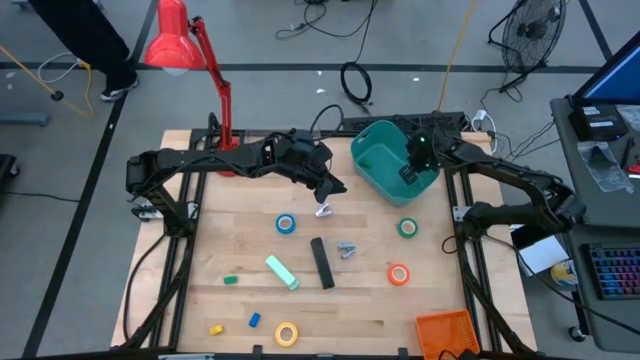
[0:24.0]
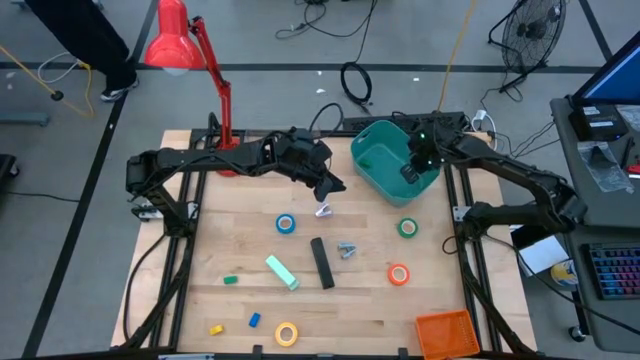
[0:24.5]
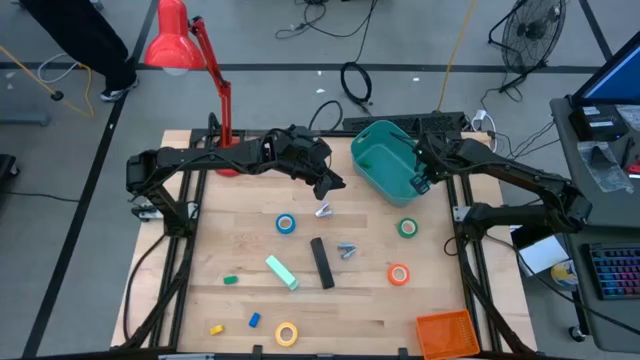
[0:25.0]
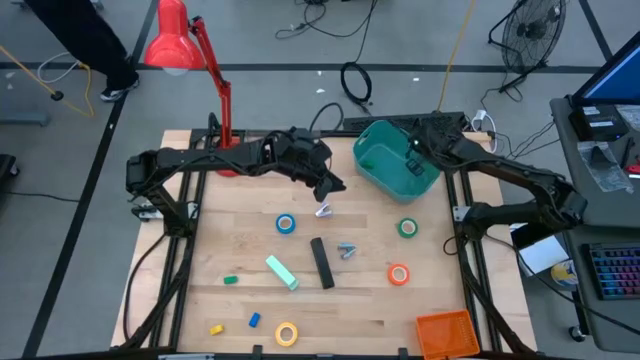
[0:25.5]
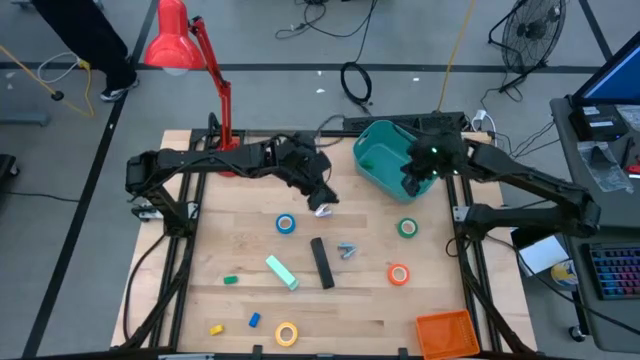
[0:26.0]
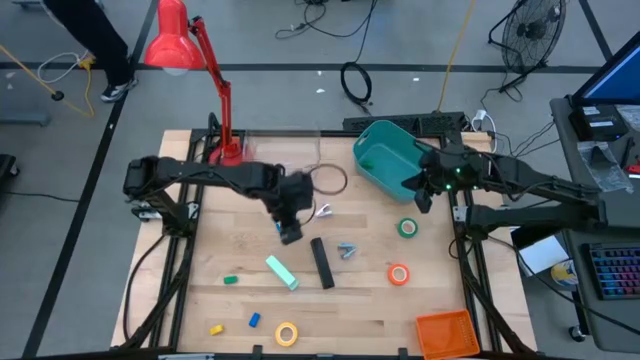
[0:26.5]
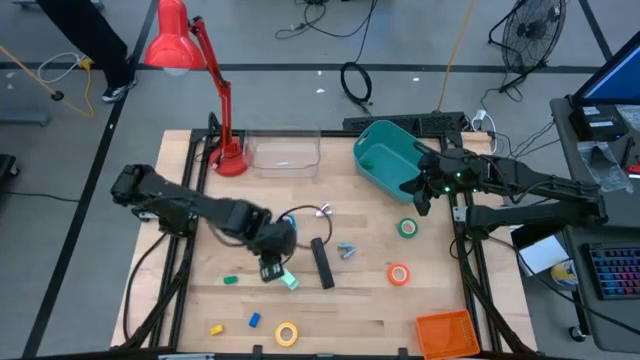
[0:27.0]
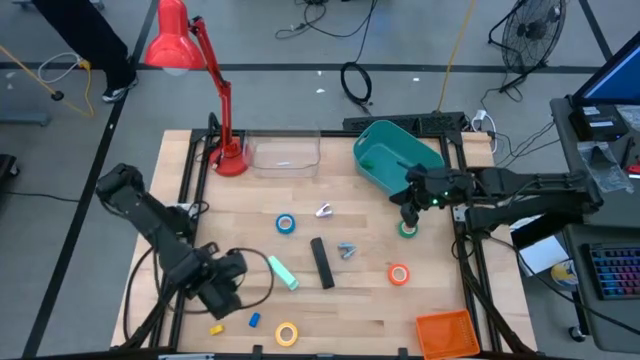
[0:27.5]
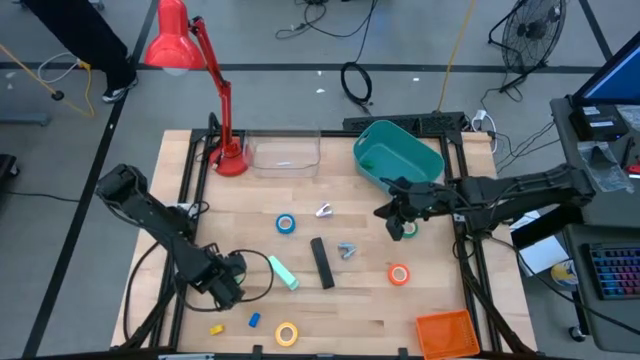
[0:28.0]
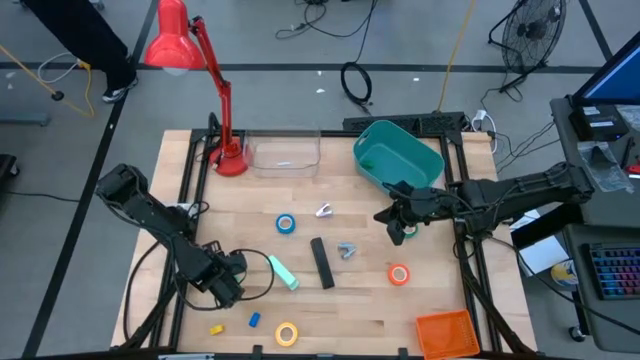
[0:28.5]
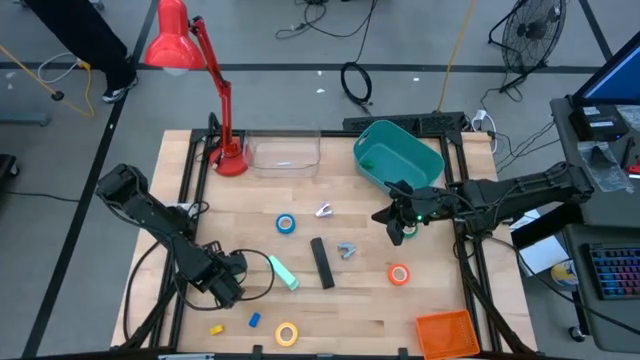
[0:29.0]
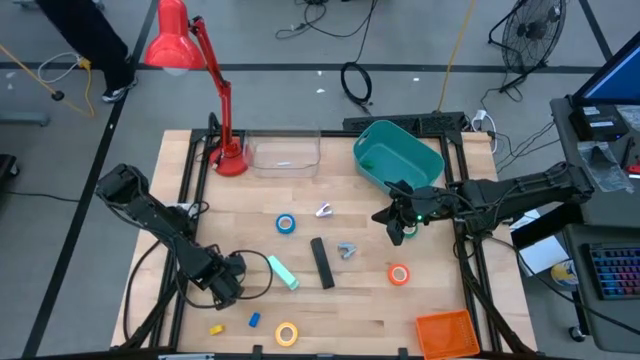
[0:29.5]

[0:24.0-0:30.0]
Task: Pick and place Stapler, Stapler remover, tape
Put the green stapler into the green bin

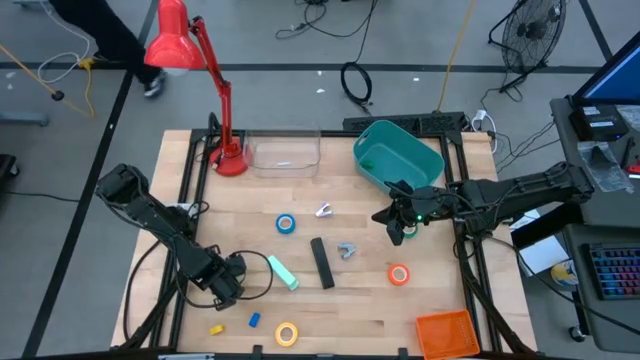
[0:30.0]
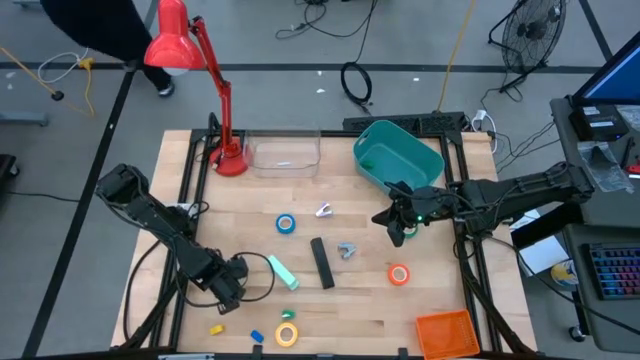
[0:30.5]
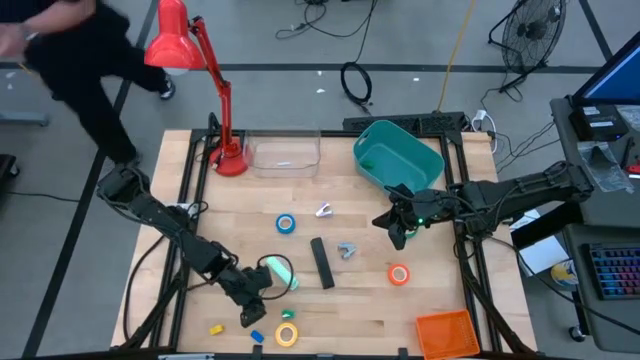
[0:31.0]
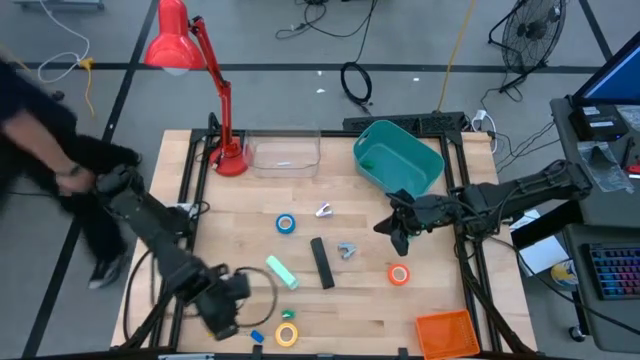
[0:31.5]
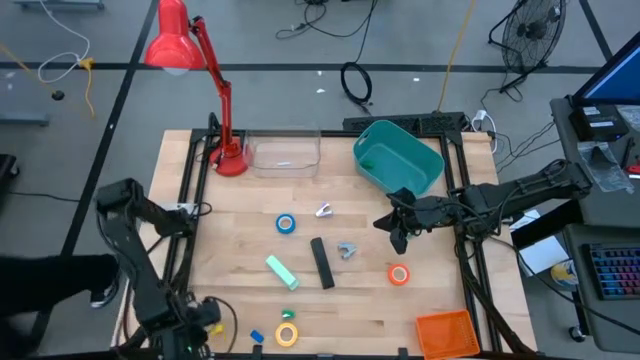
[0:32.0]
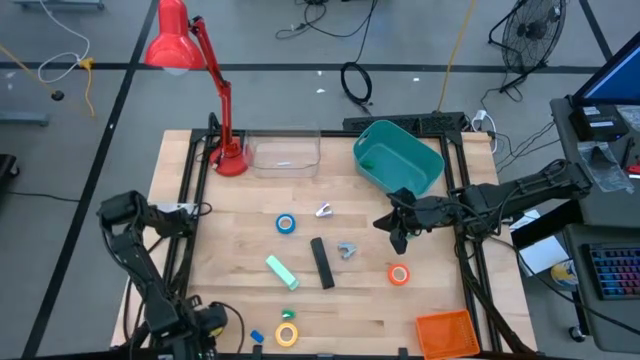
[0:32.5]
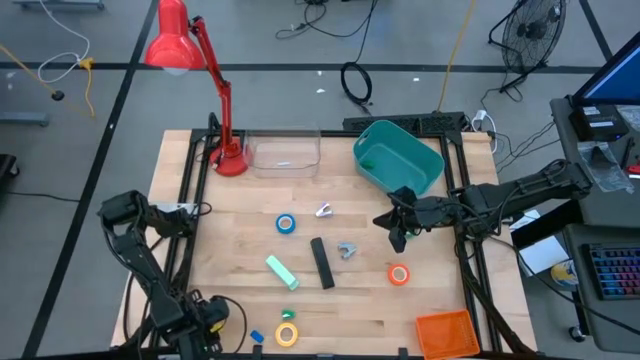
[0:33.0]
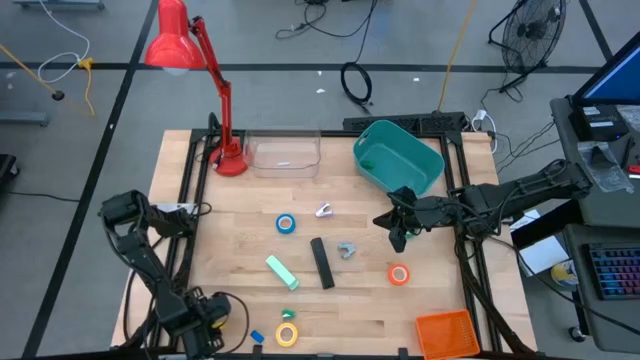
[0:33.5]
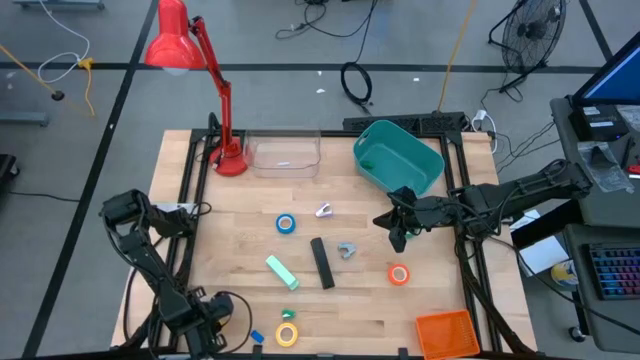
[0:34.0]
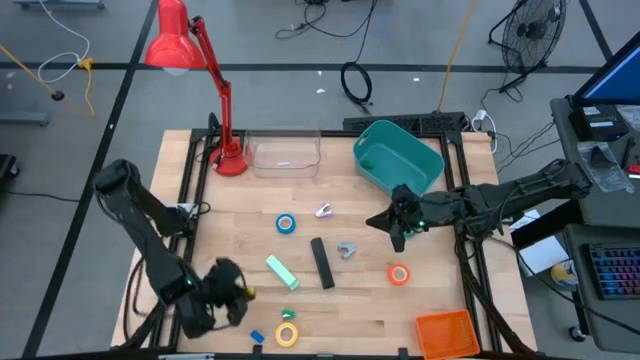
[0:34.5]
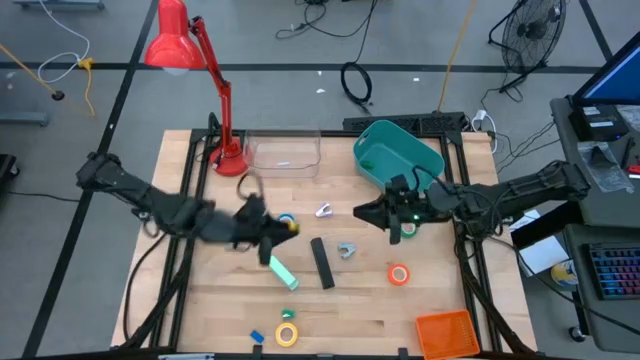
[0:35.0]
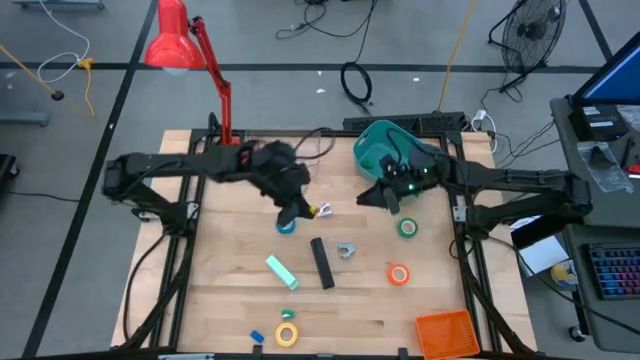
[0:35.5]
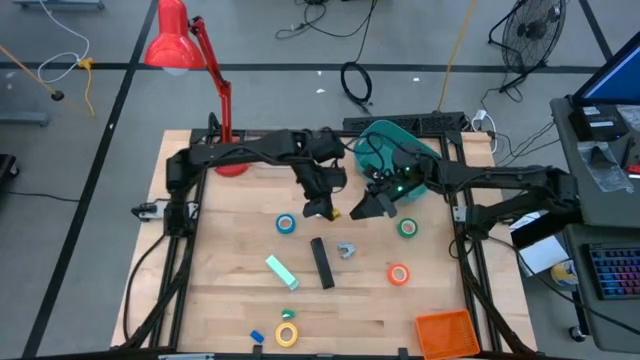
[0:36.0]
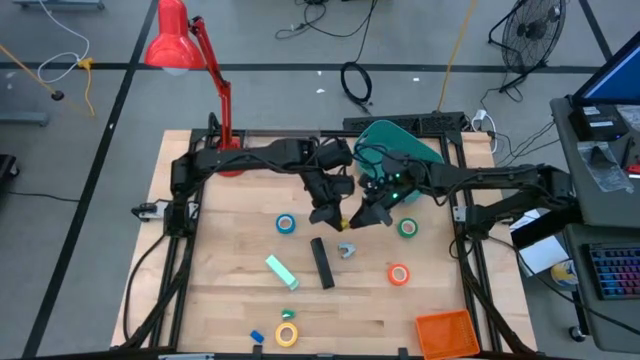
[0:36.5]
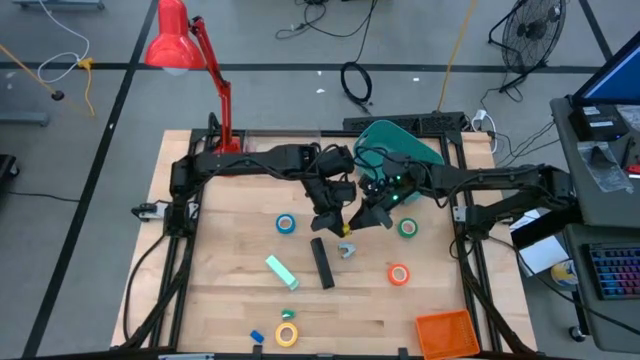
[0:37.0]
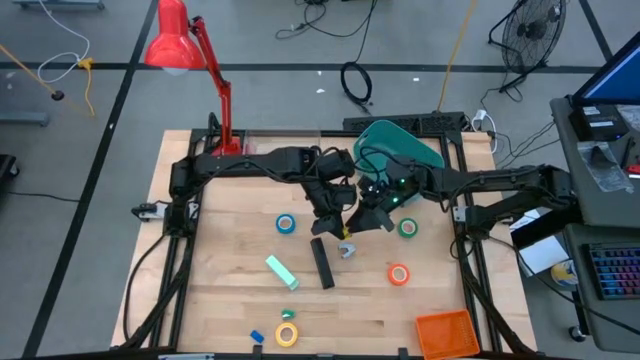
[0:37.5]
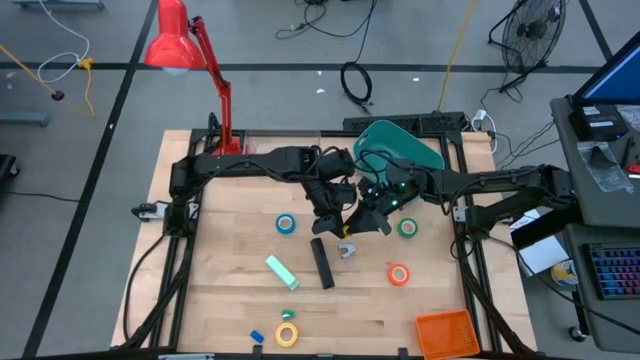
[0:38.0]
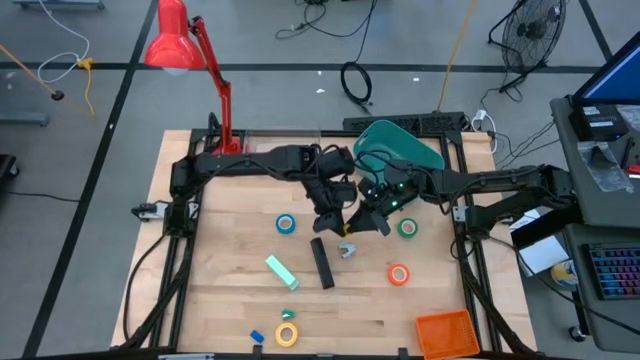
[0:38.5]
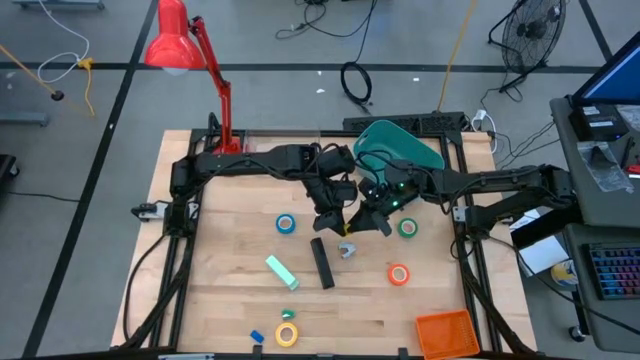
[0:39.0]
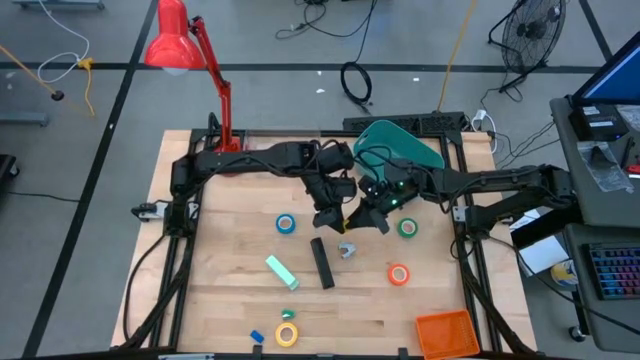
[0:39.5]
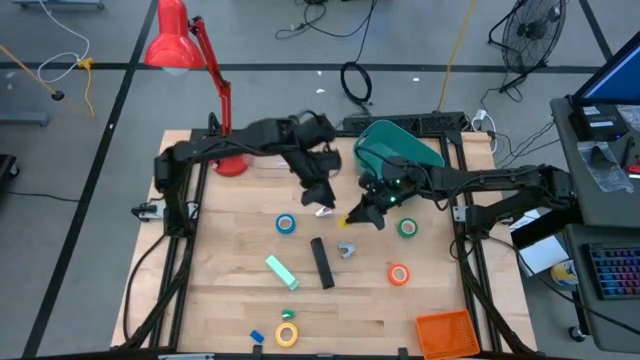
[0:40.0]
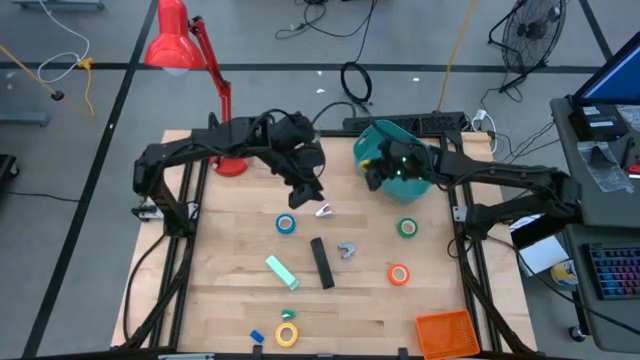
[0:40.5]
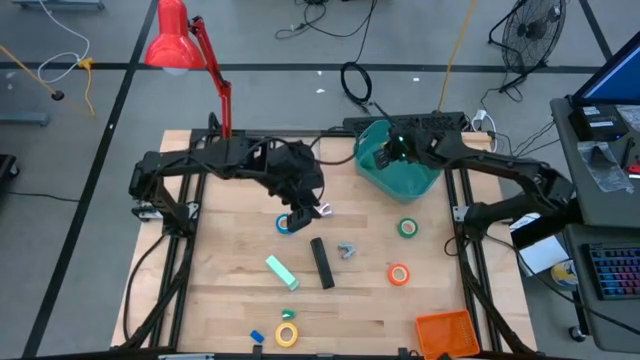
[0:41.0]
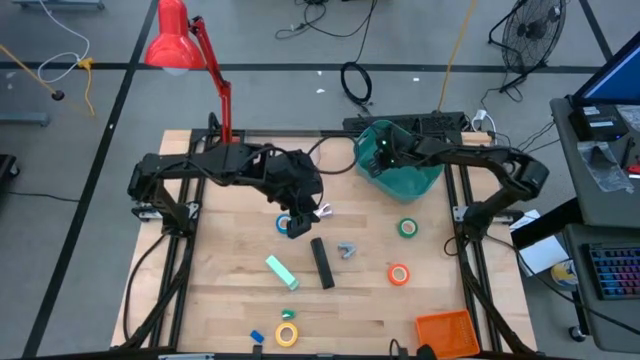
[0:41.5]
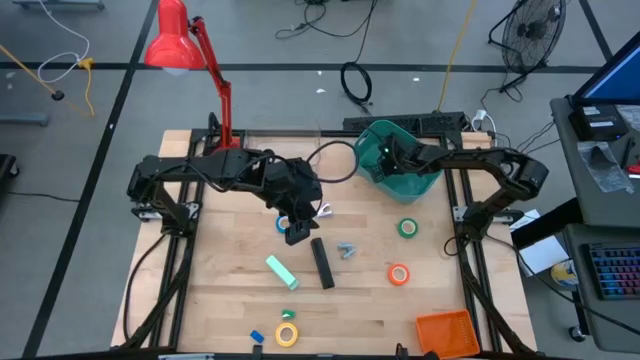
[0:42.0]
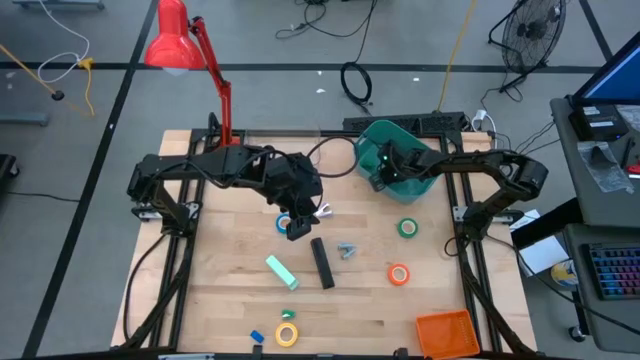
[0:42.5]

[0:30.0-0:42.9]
Put the yellow stapler into the green bin

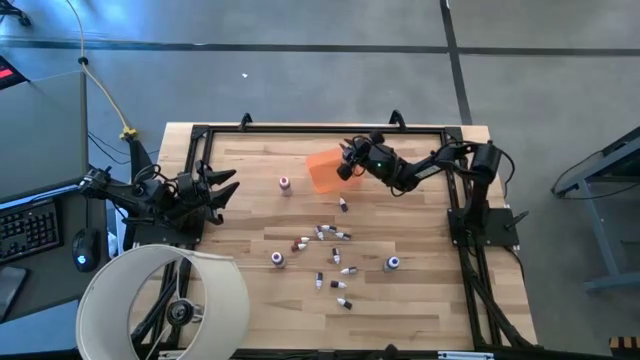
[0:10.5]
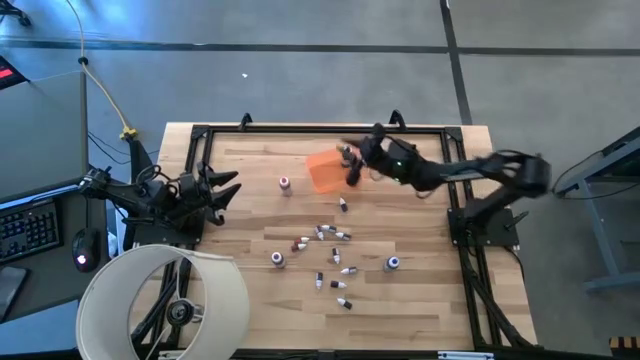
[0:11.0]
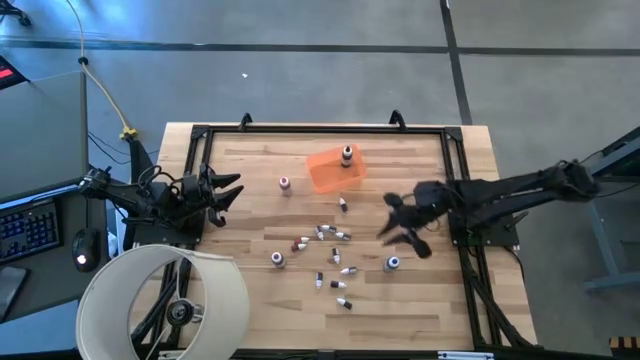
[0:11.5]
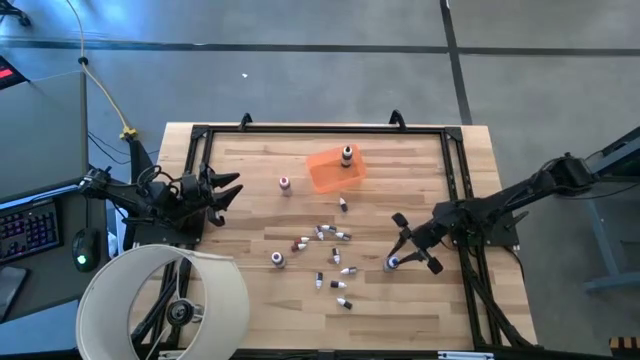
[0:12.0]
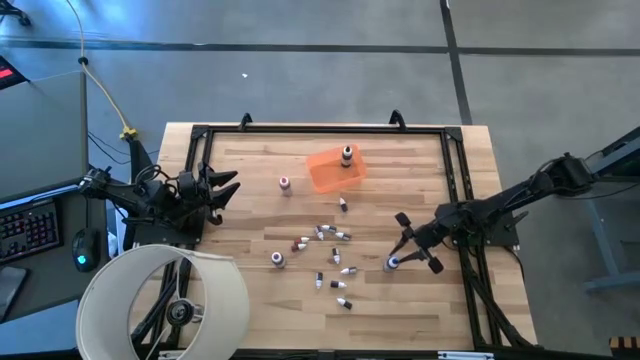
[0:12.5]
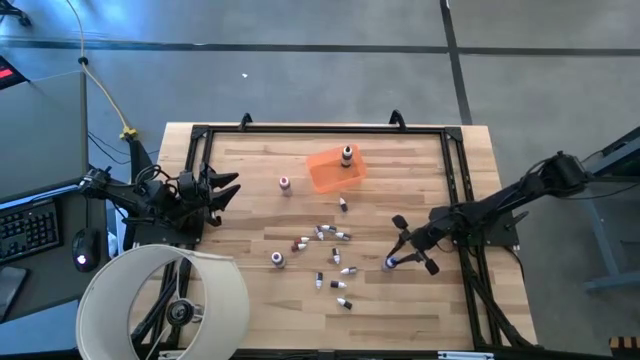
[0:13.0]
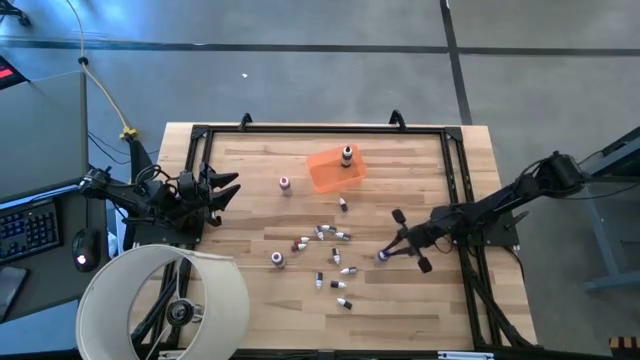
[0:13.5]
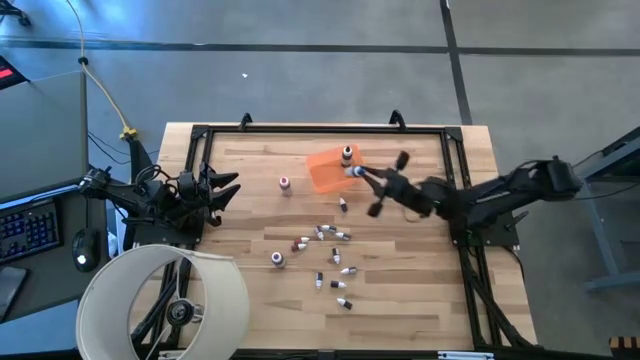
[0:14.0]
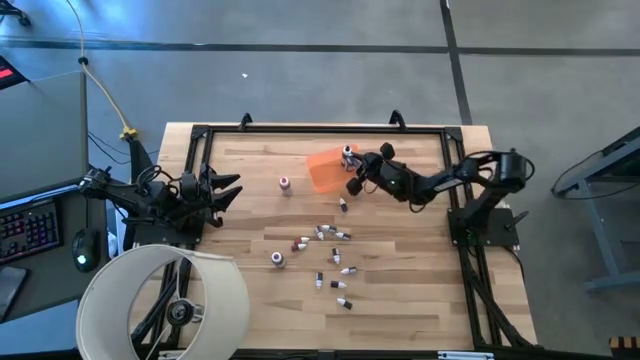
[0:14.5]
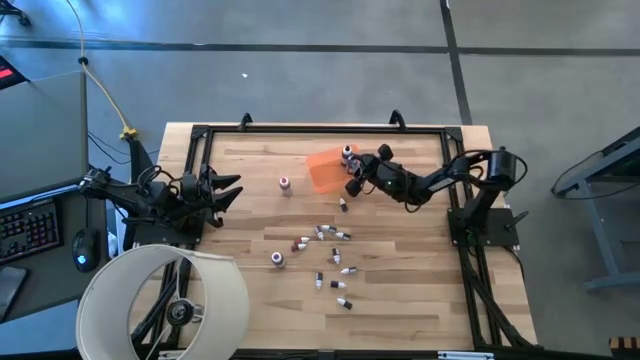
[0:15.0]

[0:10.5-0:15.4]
Task: Pick & Place food coloring
Put the big blue food coloring bottle into the orange bin
